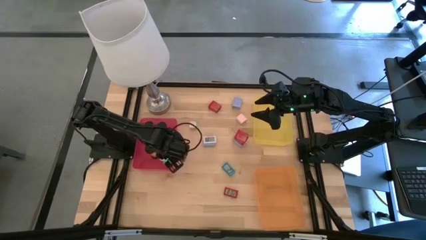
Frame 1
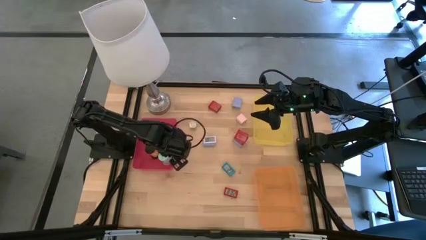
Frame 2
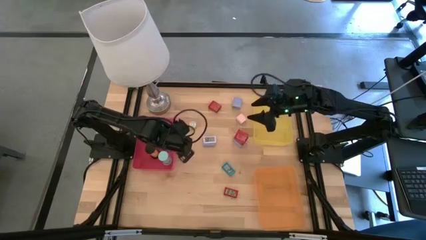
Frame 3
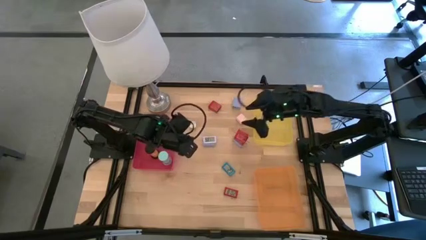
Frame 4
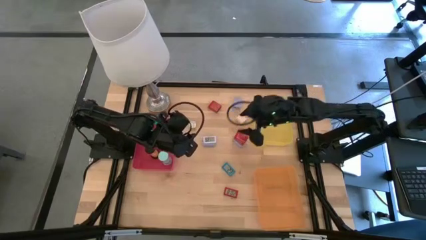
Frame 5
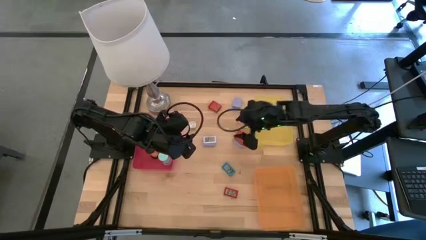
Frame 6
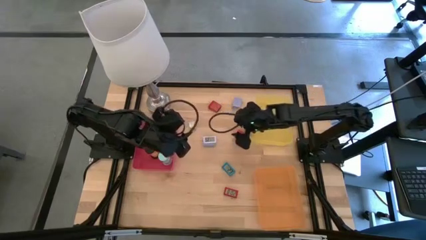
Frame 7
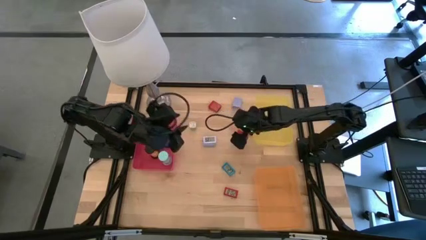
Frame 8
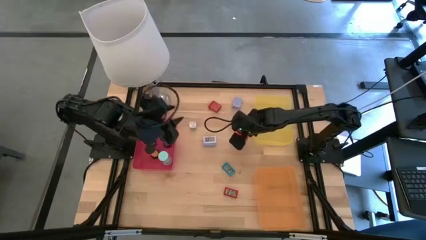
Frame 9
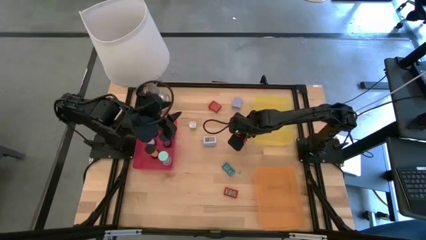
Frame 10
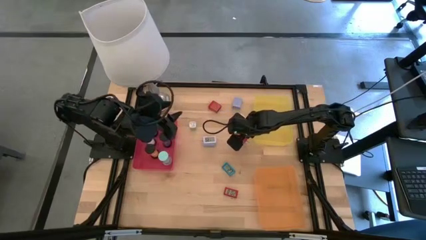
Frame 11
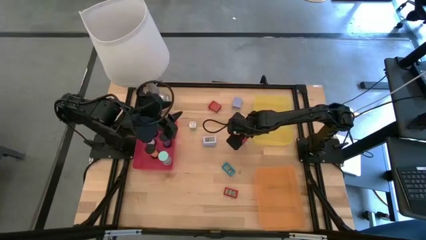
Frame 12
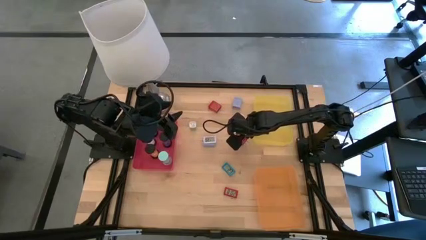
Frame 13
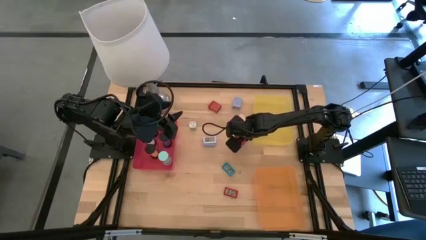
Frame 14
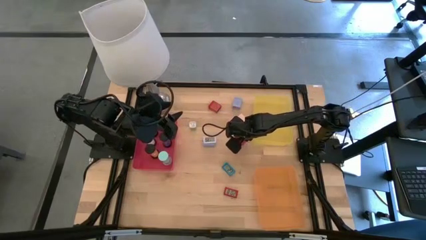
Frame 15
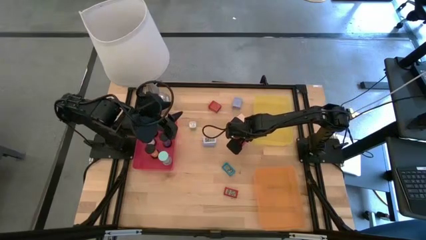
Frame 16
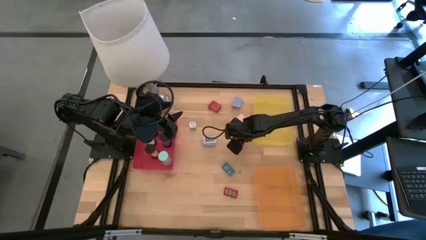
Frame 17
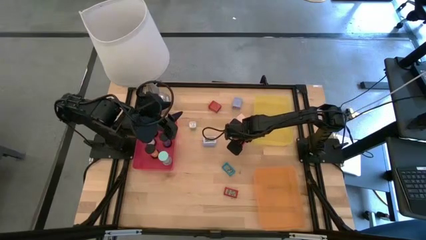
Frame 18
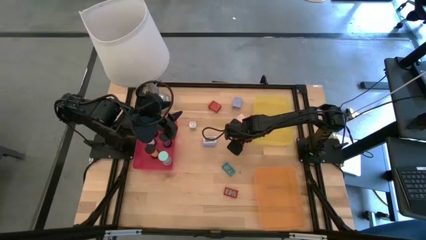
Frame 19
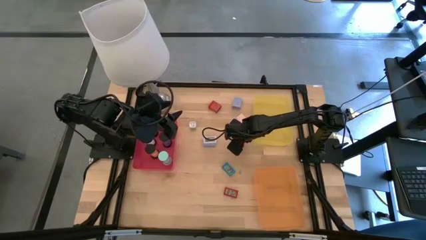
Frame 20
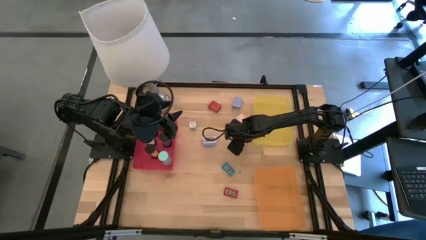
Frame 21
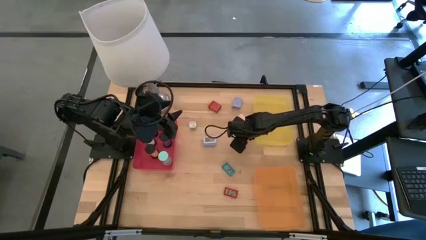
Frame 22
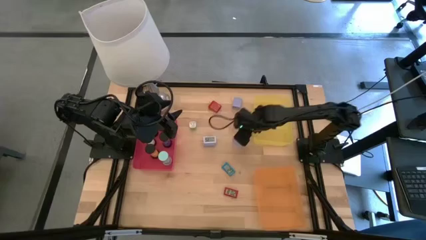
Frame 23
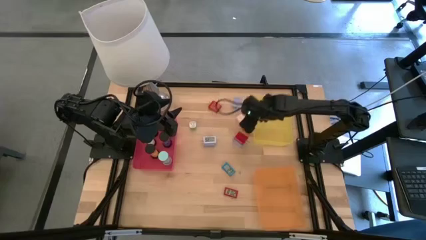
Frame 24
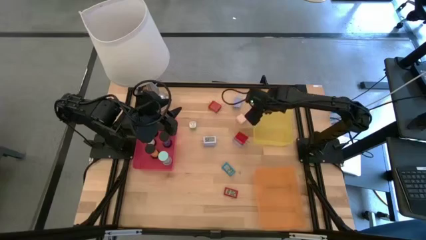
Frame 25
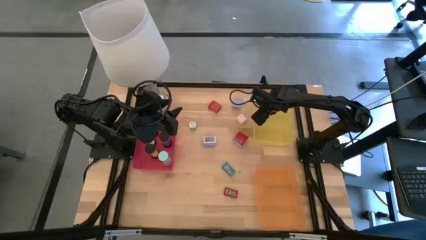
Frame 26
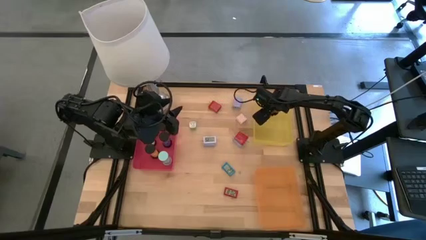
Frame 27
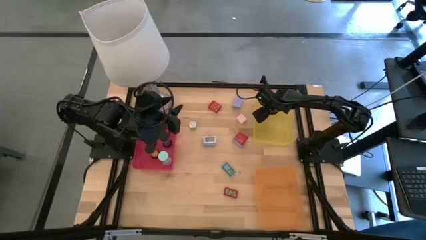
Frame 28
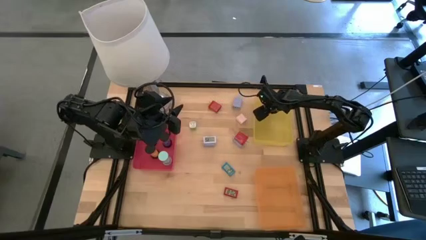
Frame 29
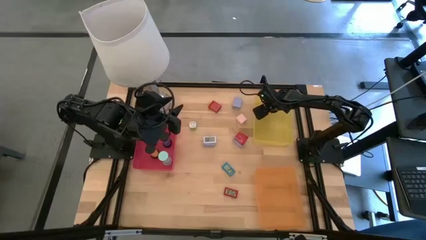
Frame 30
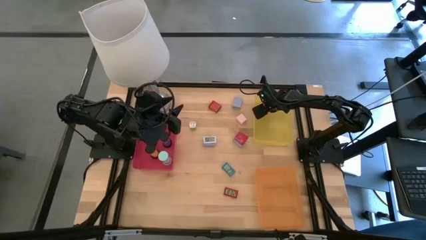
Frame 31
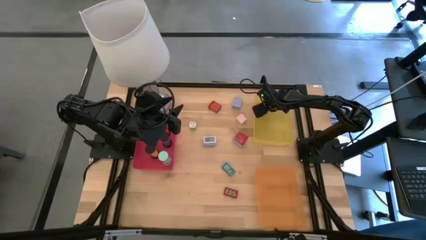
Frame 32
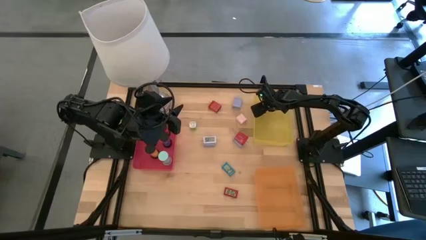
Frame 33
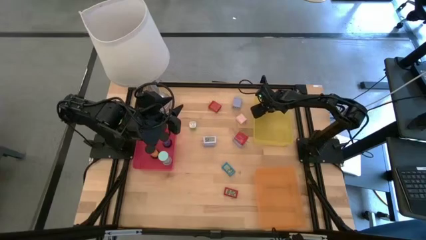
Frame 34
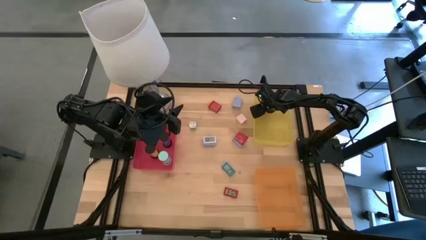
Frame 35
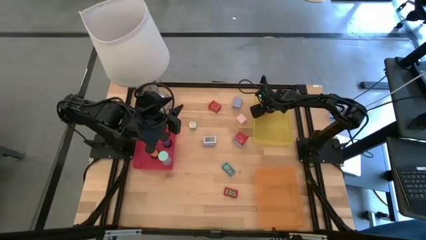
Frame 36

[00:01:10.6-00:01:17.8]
Task: Pick & Place Office items
Put the bottom red charger adapter into the yellow bin

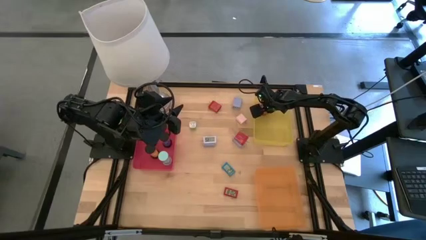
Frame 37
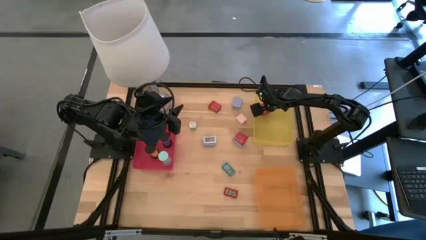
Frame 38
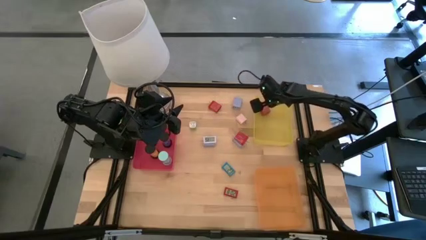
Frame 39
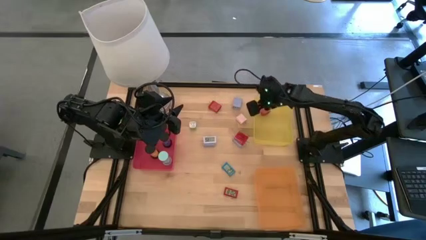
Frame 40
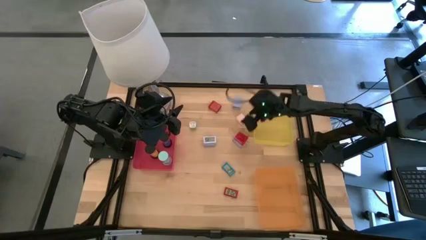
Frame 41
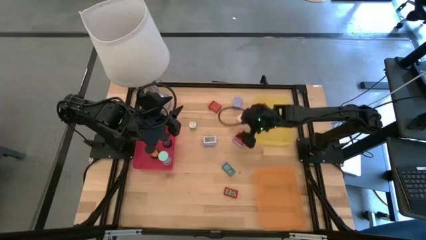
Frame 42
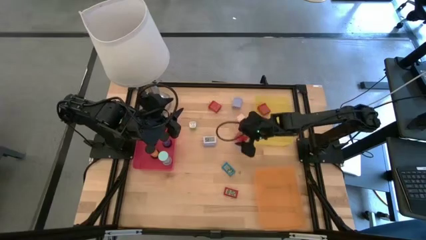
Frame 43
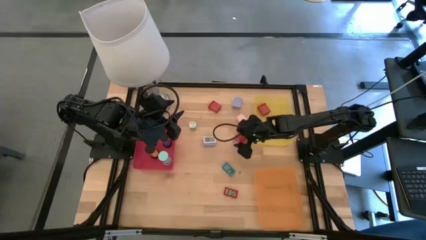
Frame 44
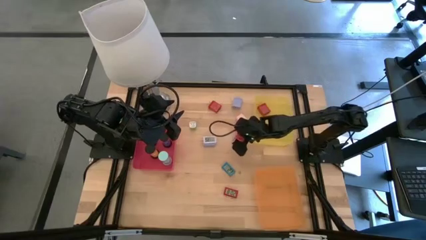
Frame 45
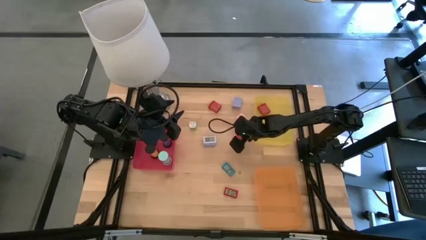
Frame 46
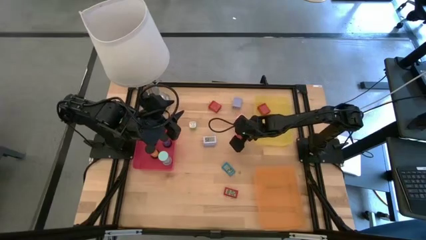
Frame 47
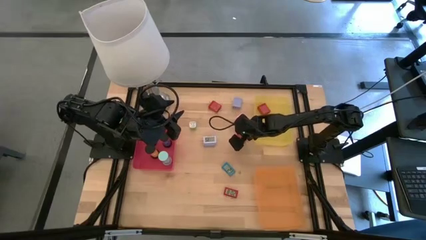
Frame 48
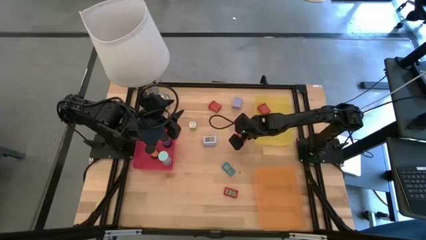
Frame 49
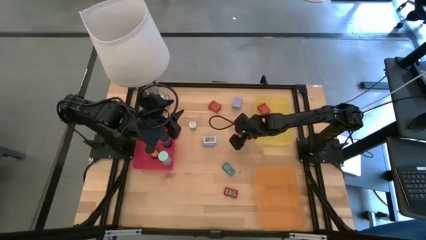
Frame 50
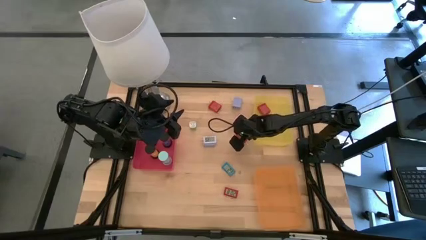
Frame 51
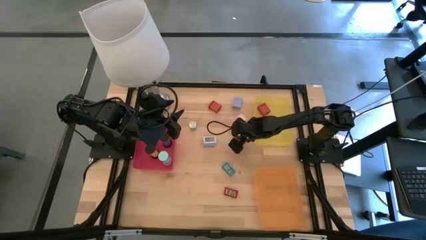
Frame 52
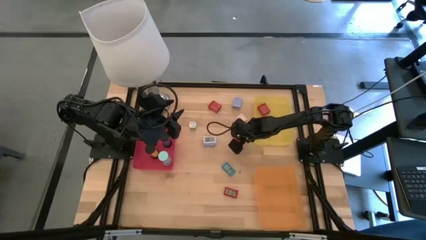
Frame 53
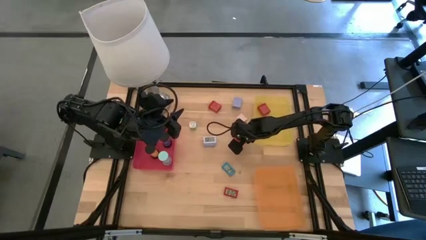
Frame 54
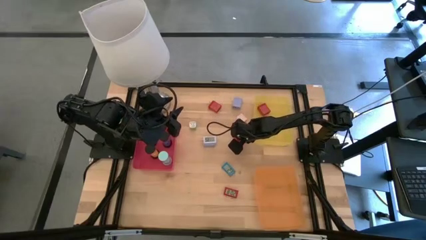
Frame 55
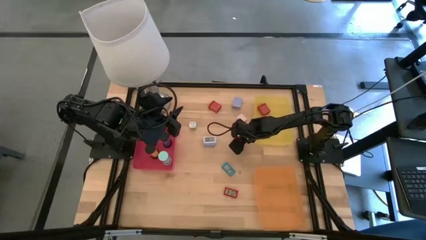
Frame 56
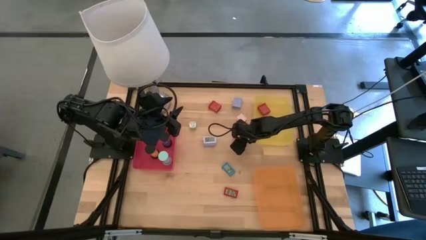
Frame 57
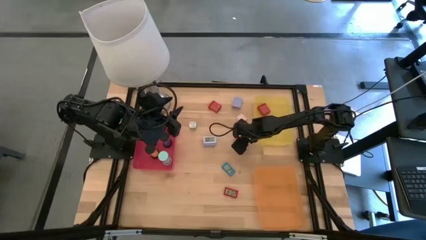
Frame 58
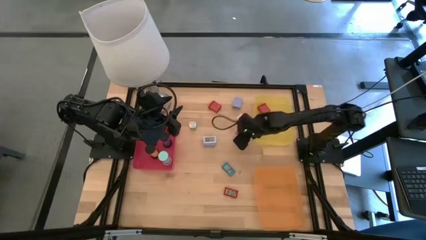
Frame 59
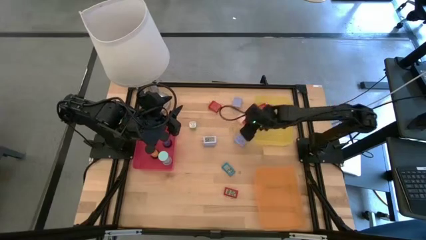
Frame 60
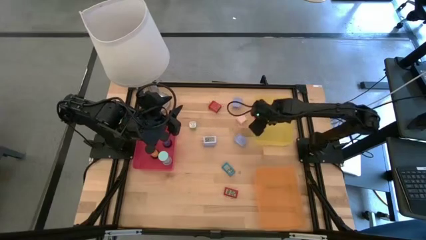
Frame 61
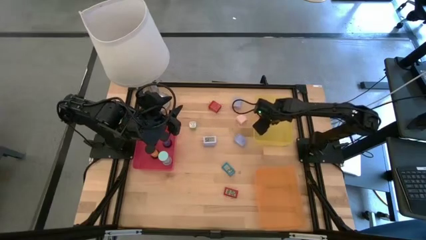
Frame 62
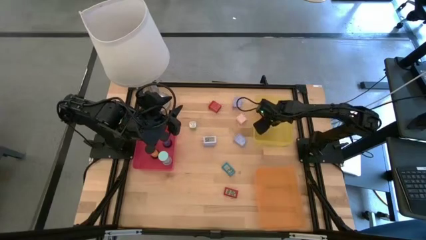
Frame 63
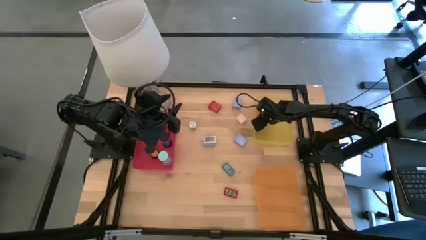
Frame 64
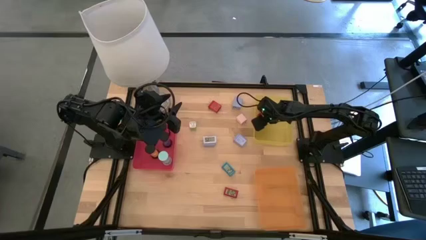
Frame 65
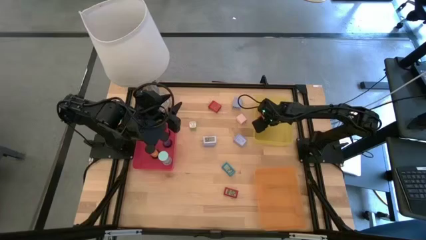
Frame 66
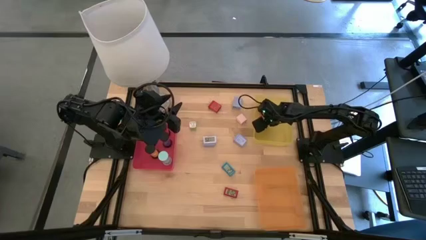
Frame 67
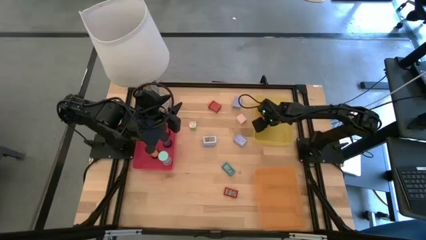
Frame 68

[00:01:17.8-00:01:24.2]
Put the bottom red charger adapter into the yellow bin
